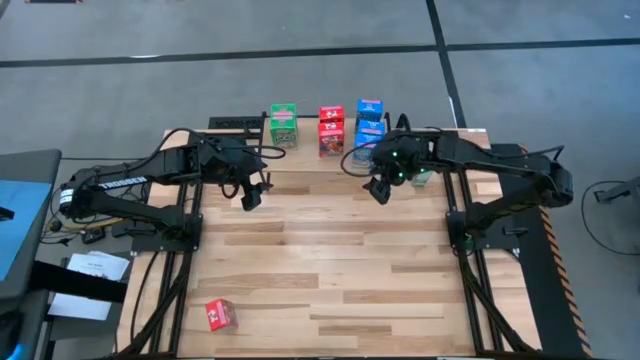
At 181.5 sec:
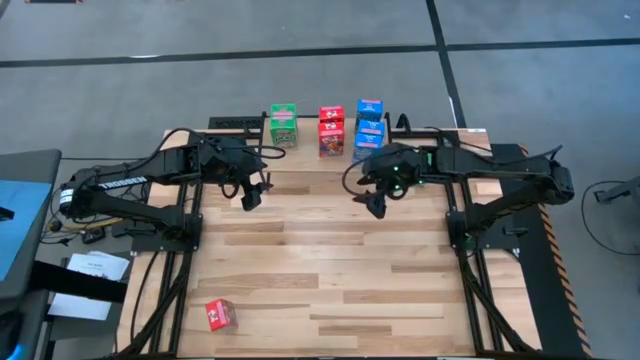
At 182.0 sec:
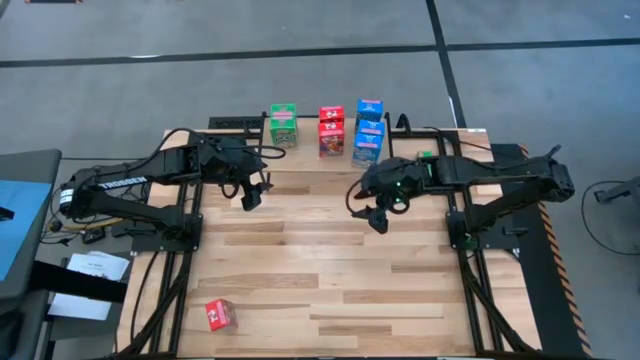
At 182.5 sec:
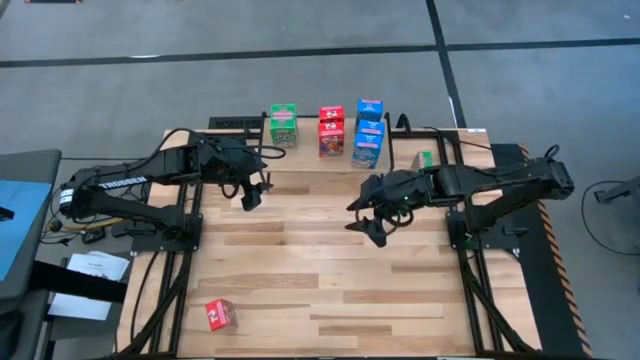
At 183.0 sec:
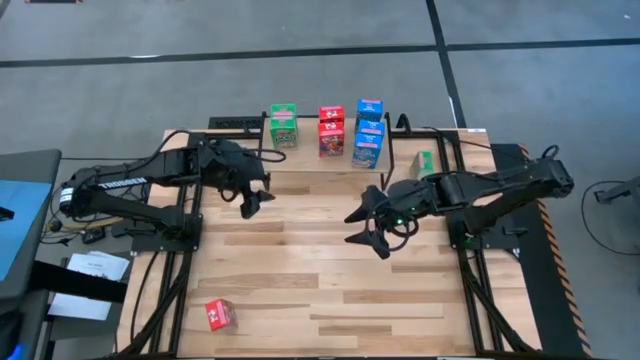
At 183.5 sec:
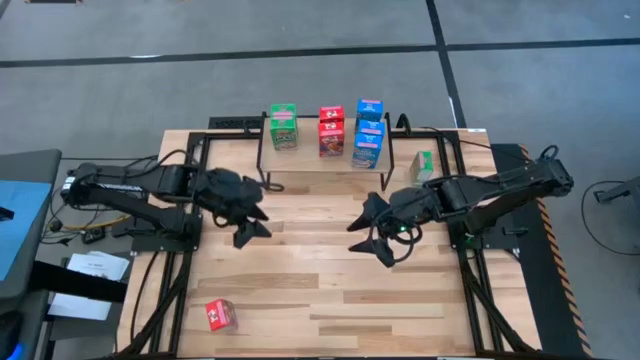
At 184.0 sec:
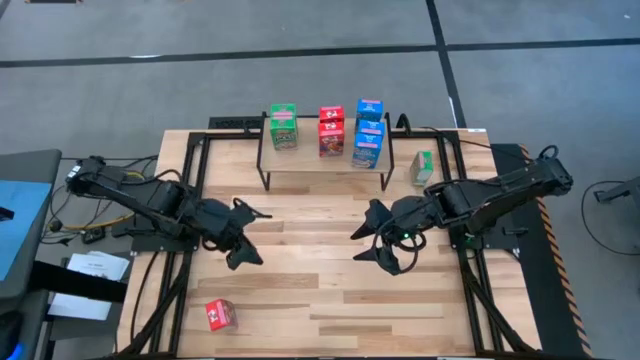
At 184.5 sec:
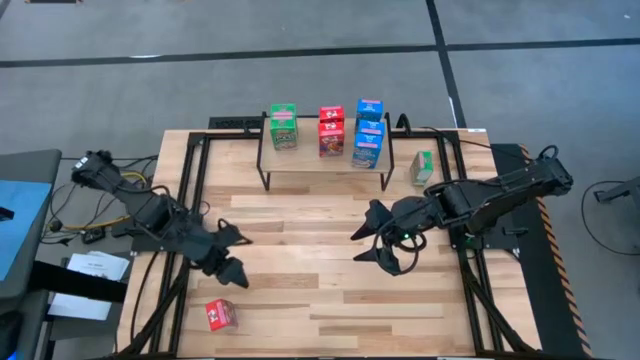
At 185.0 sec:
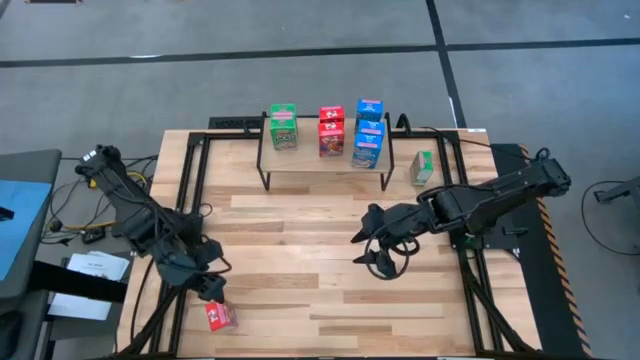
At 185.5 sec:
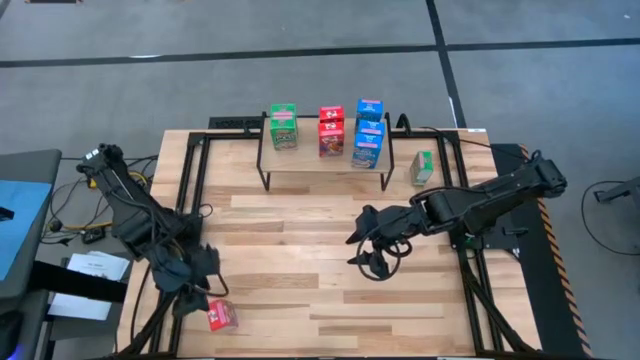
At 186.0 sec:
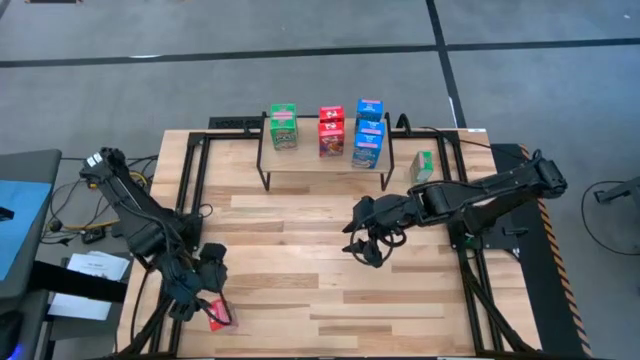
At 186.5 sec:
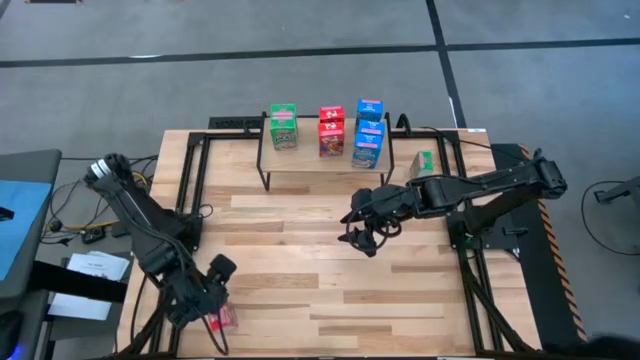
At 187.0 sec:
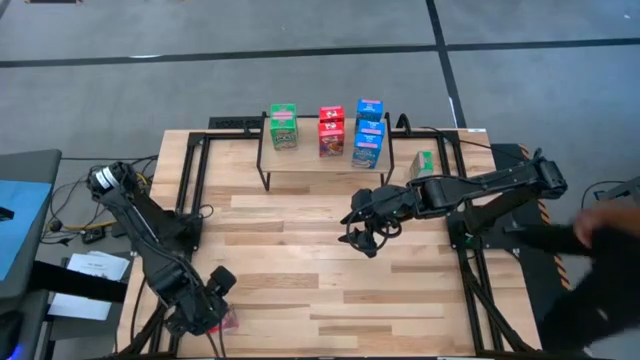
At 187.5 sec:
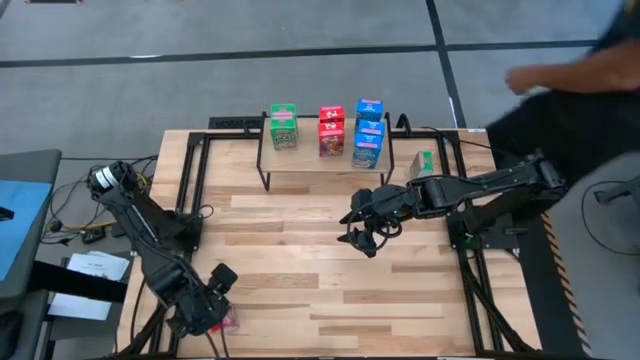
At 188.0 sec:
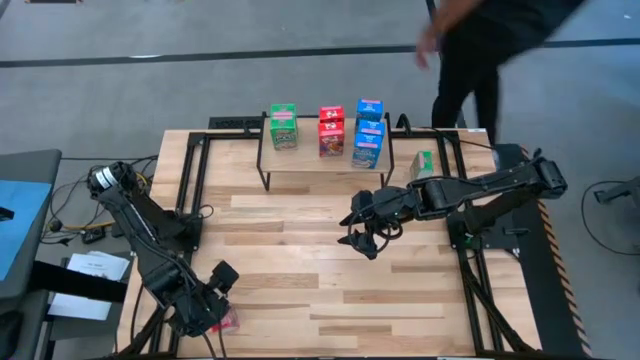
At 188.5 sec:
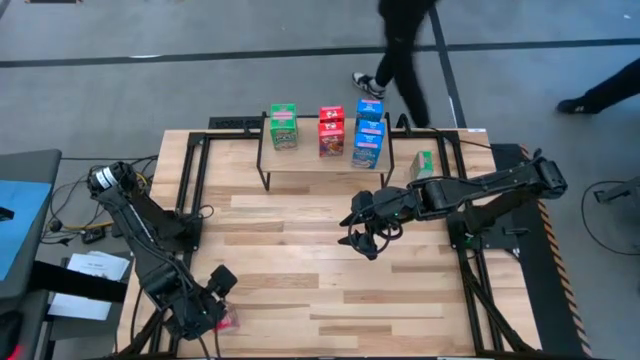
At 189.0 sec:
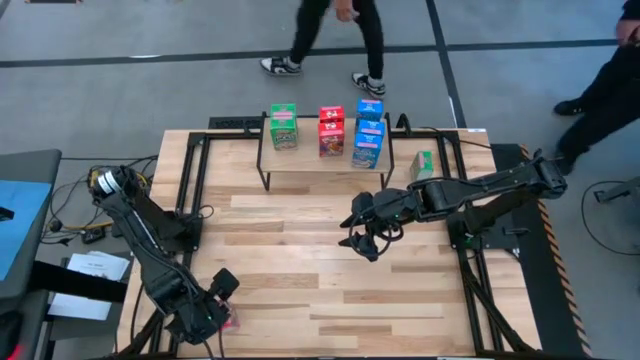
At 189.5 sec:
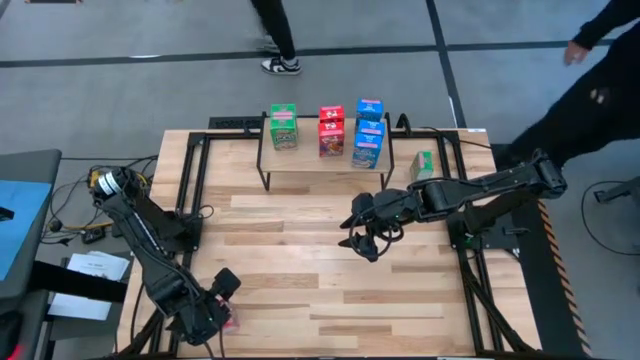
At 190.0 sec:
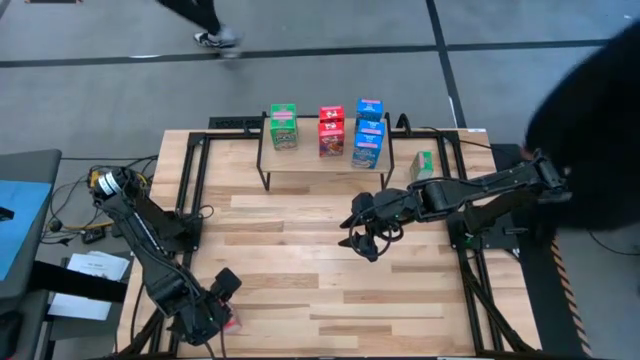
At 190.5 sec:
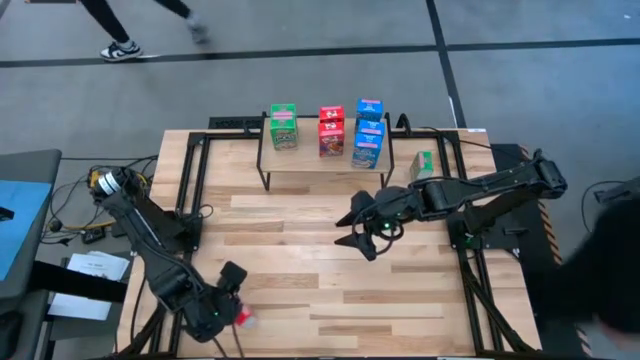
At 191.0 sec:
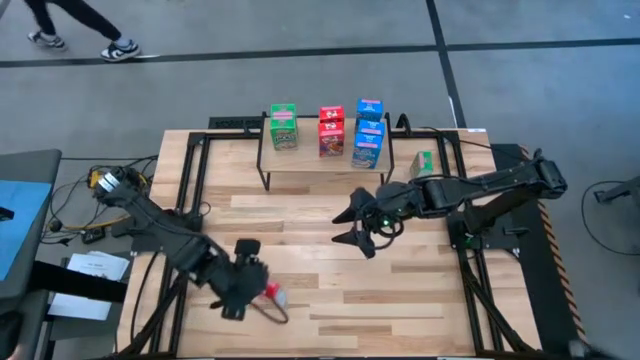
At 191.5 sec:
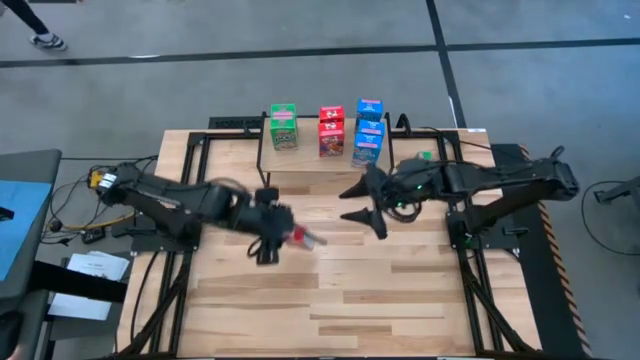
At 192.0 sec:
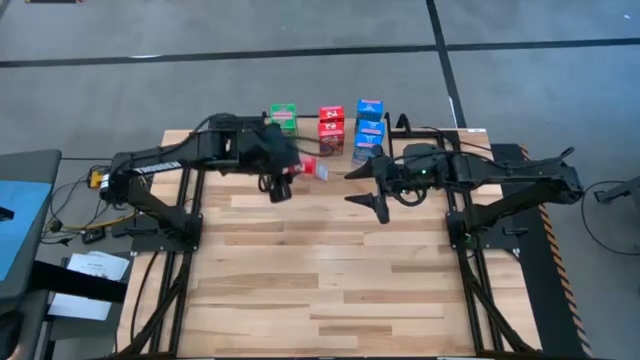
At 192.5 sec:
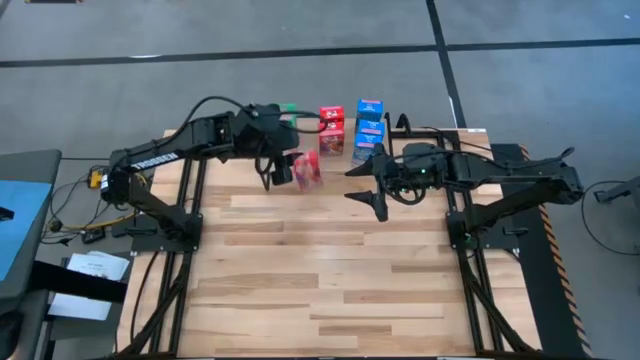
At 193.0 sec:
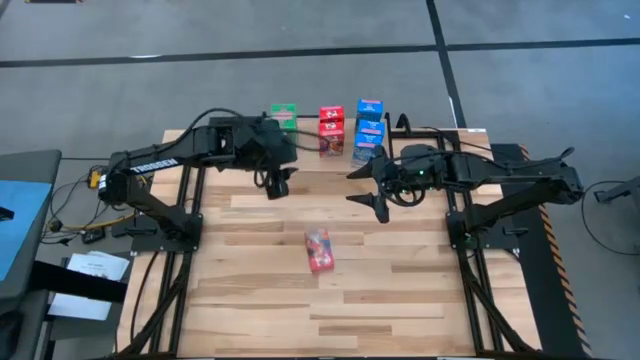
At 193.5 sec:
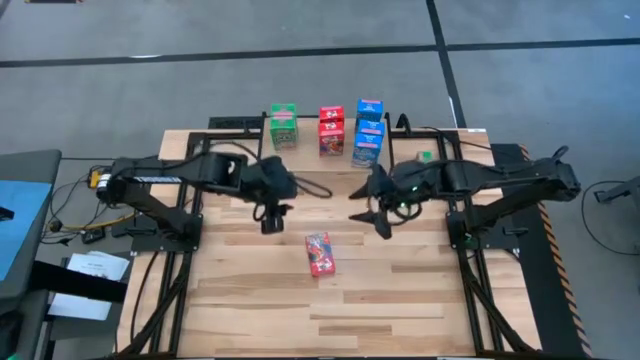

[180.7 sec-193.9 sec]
Task: Stack cereal on shelf
Put the red cereal box on the shelf aligned with the other red cereal box
